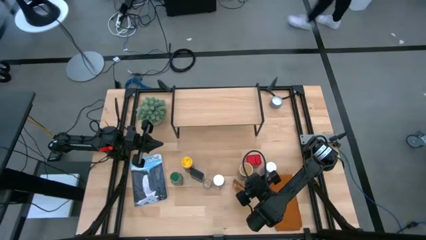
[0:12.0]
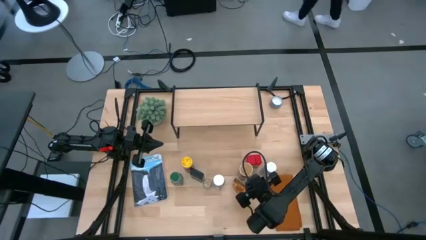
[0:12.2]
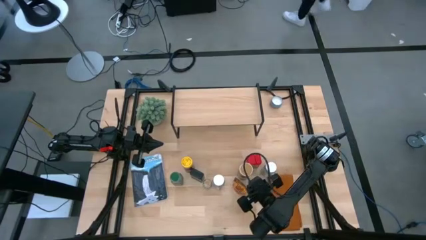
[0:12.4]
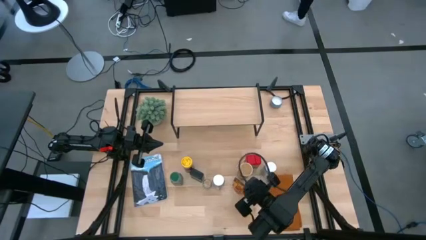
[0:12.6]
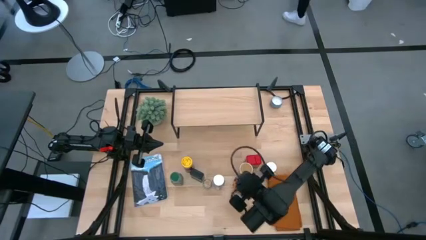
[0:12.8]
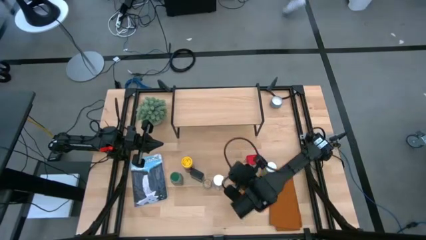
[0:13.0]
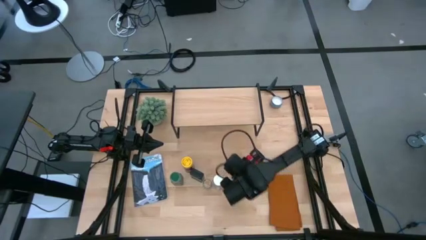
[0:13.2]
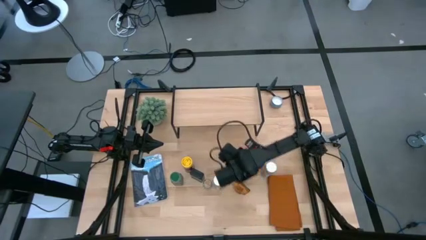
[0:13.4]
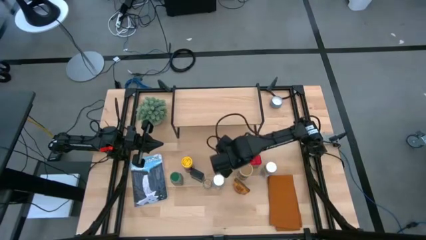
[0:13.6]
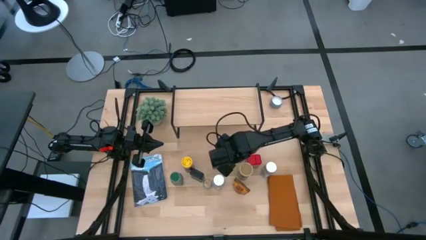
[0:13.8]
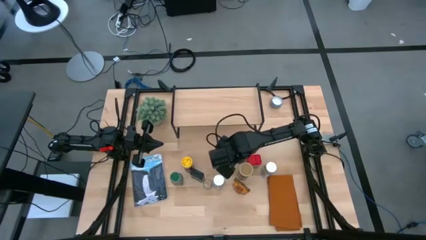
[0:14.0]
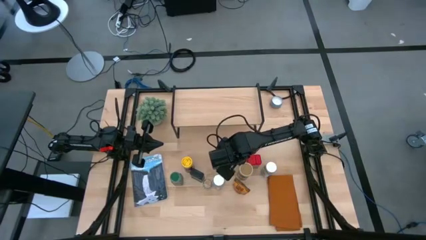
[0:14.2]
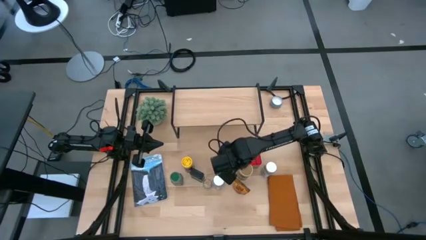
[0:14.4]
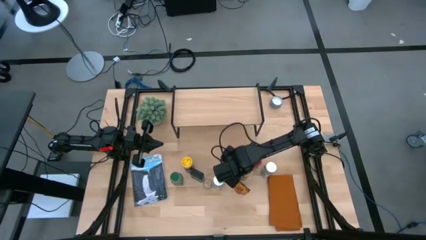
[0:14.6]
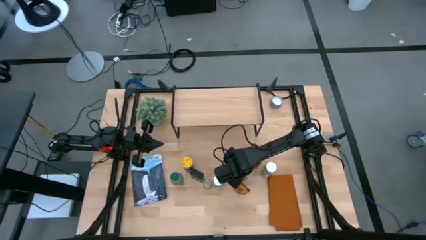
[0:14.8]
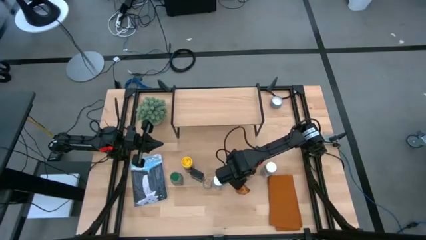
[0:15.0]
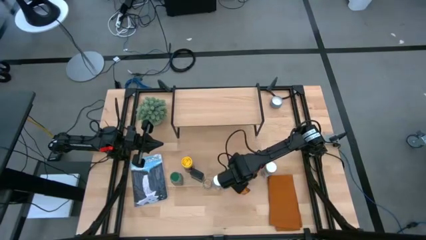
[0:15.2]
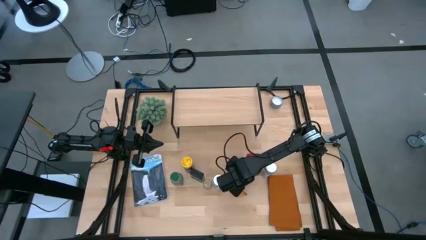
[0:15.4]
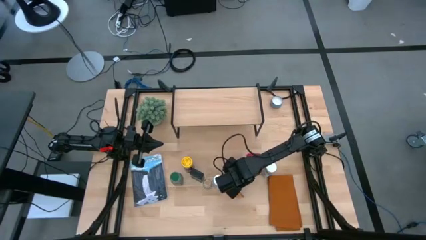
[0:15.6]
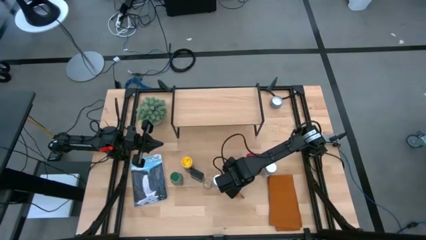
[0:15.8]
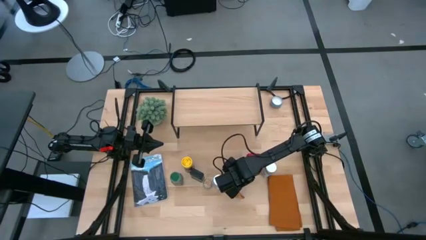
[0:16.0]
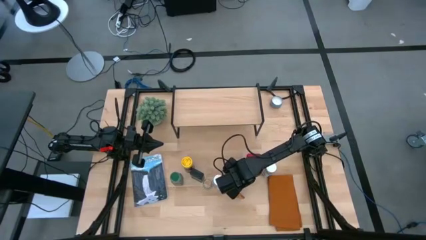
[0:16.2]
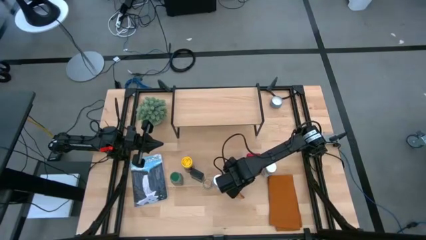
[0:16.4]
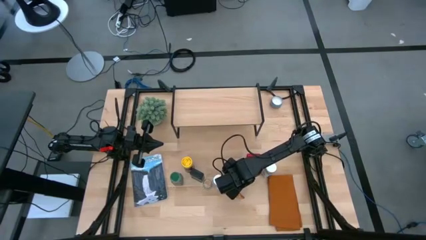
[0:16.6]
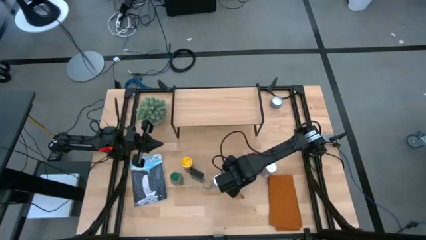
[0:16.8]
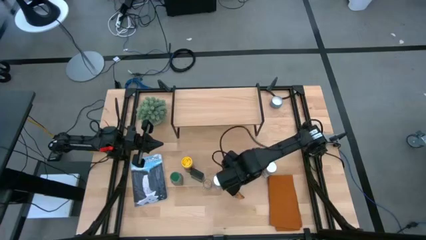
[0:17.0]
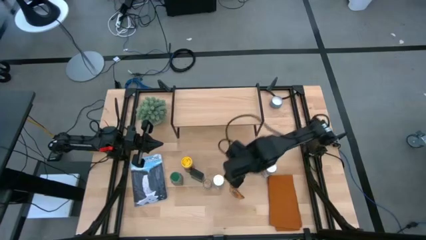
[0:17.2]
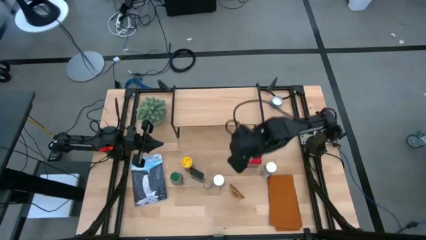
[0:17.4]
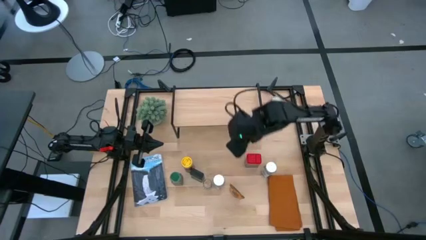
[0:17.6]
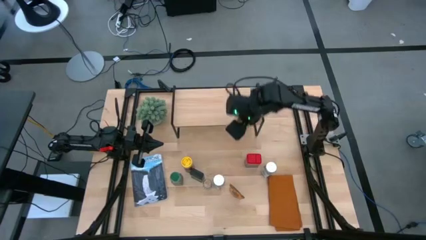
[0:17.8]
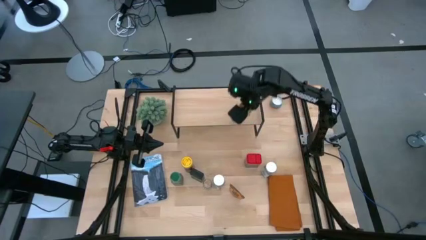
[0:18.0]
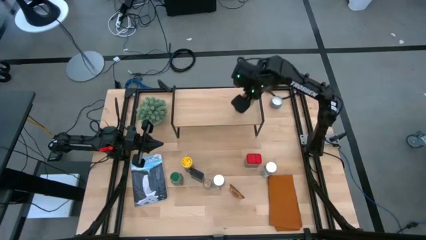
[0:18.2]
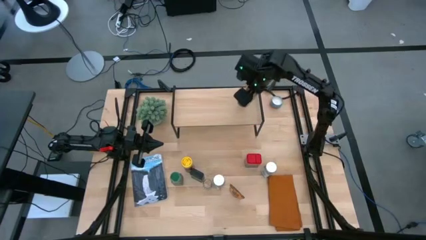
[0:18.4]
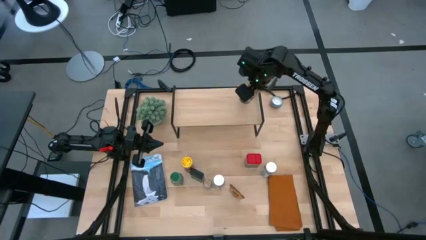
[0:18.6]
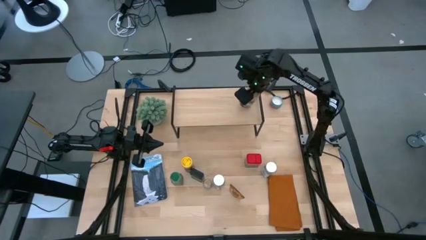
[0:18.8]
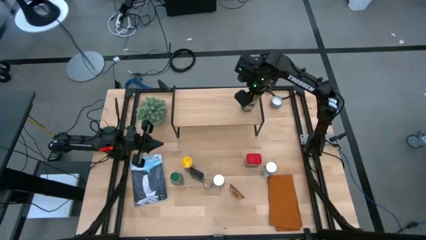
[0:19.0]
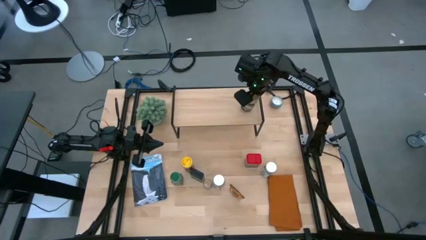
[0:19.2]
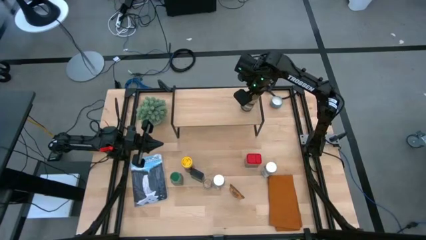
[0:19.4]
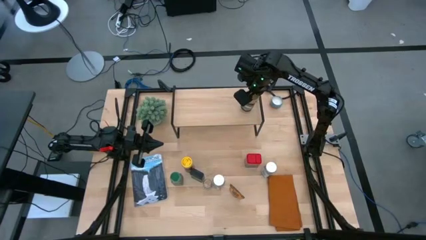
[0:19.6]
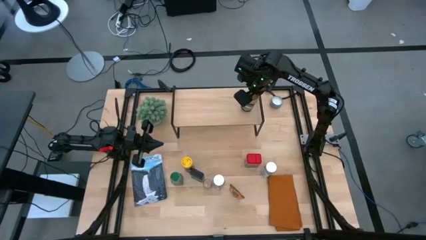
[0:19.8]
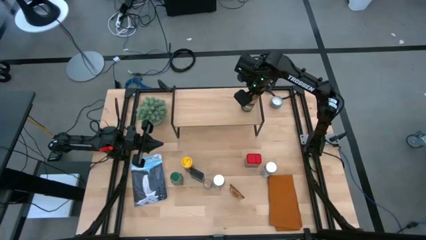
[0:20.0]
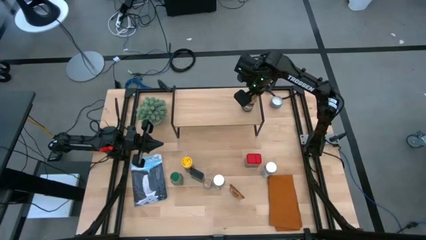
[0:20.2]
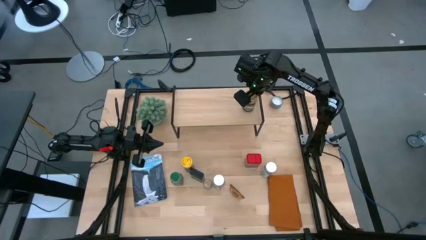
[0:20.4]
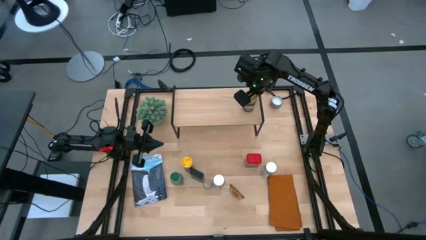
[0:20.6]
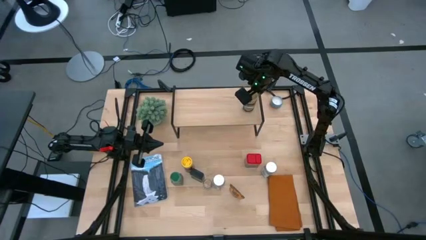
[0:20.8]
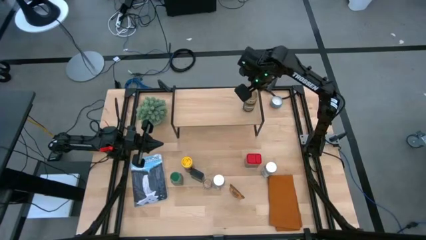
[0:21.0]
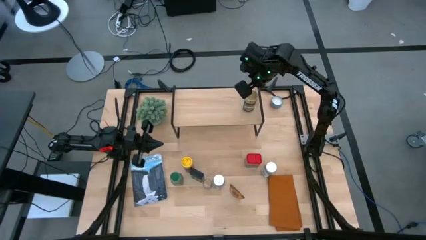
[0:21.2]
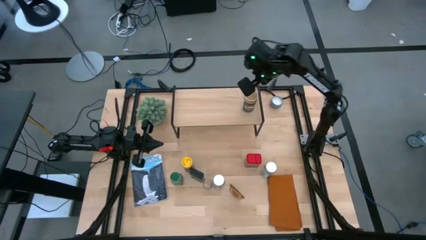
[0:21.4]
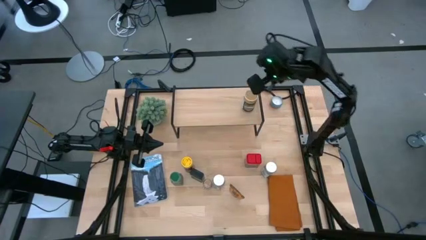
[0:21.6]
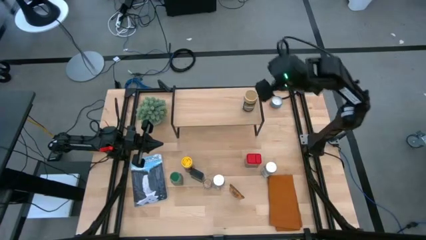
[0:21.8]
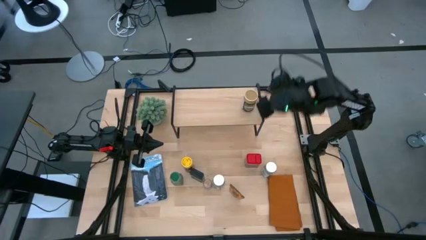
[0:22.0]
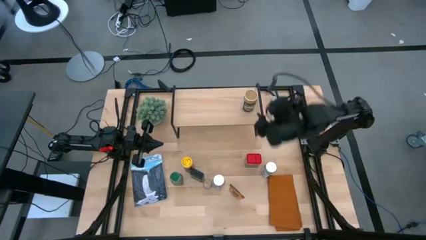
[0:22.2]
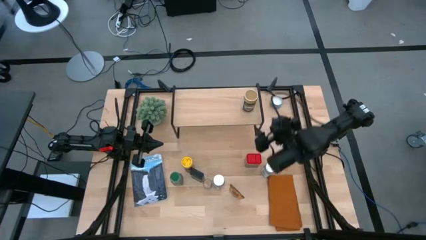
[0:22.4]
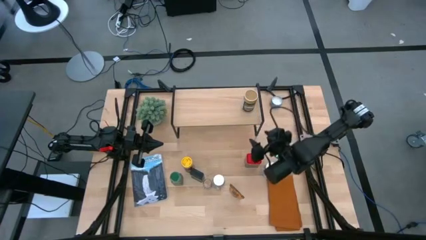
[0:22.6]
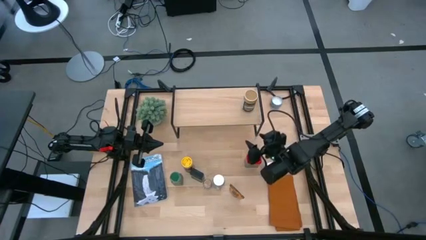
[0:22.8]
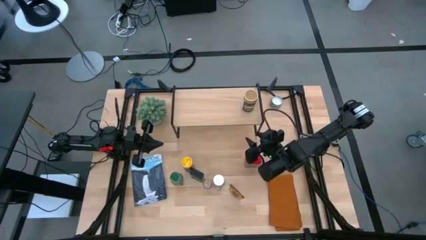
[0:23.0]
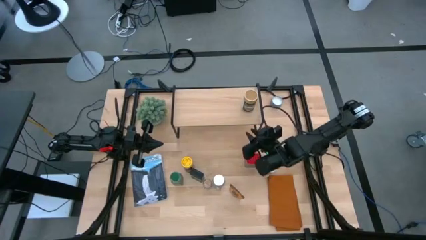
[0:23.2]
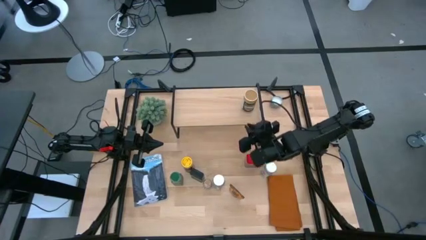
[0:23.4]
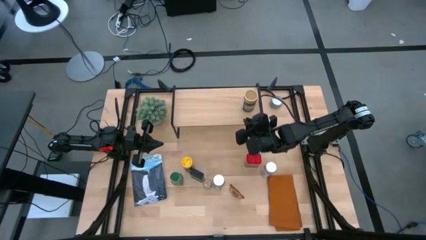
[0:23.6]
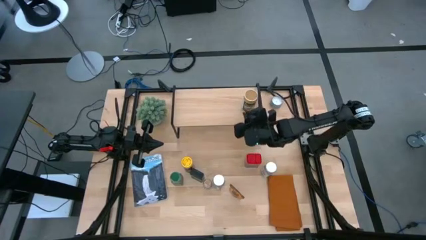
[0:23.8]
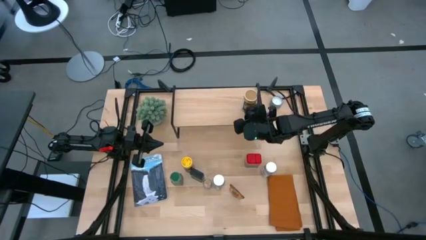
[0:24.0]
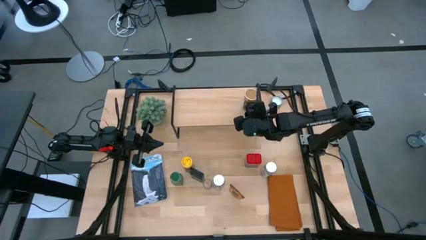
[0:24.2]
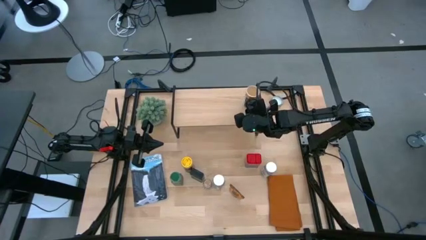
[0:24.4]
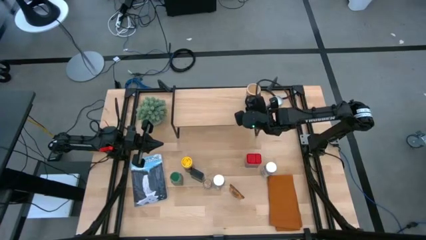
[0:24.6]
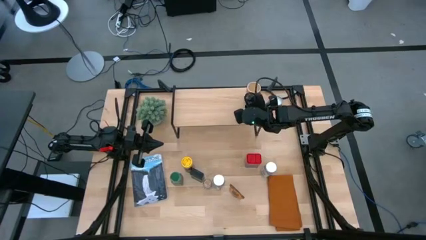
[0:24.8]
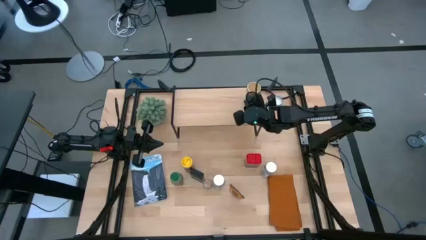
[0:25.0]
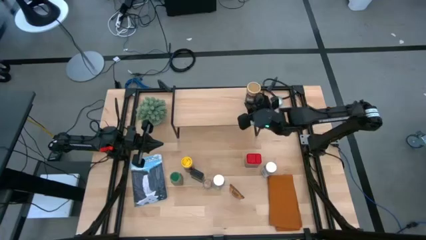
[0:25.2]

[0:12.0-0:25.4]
Task: Shelf spices
Put the golden seasoning bottle on the shelf
